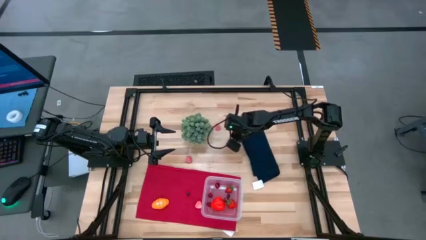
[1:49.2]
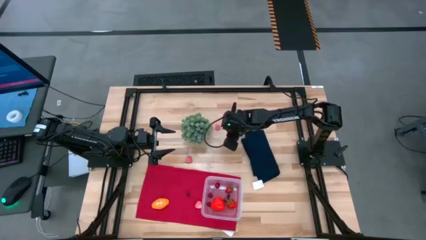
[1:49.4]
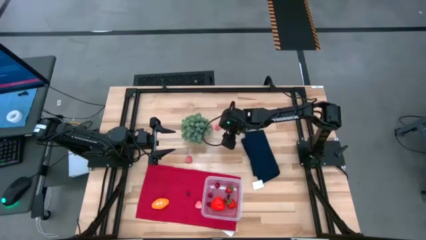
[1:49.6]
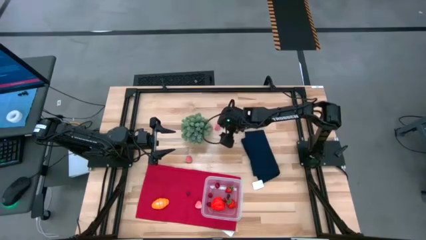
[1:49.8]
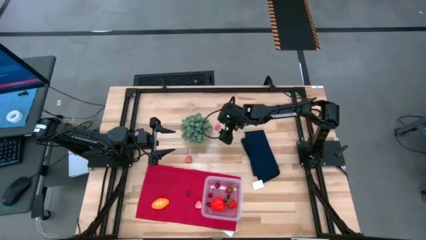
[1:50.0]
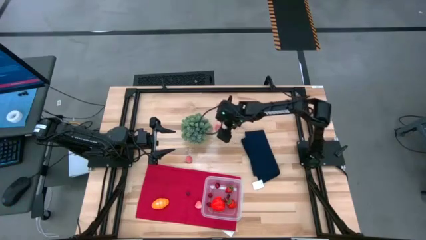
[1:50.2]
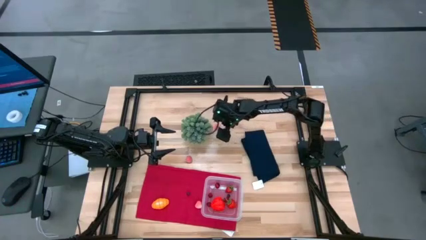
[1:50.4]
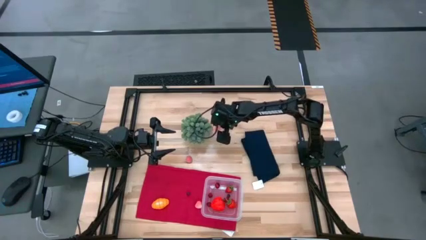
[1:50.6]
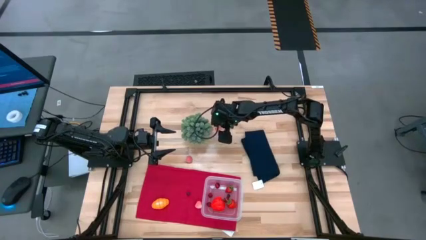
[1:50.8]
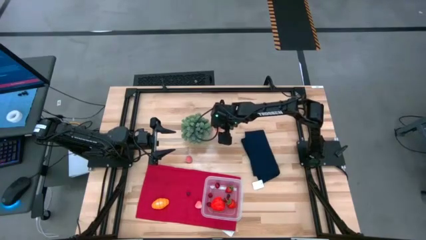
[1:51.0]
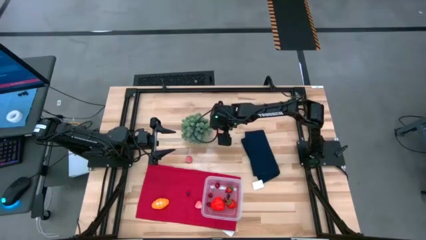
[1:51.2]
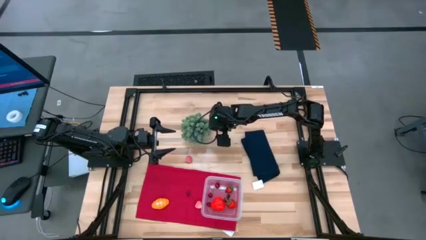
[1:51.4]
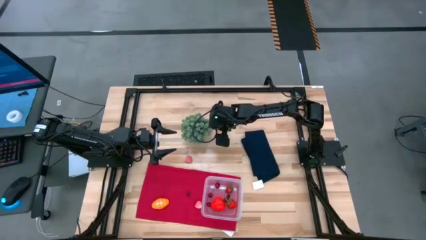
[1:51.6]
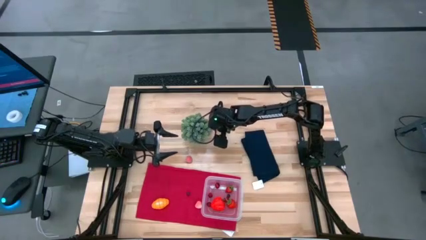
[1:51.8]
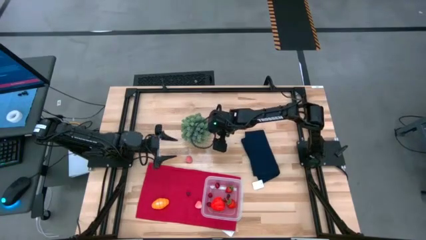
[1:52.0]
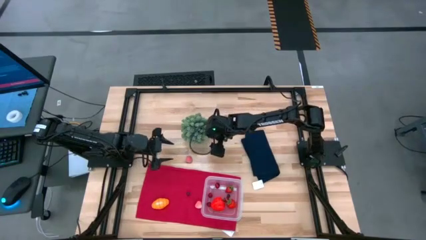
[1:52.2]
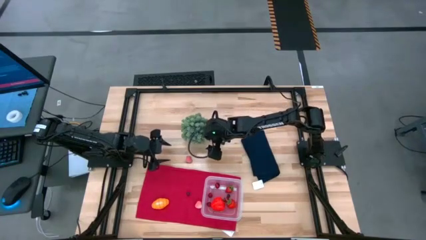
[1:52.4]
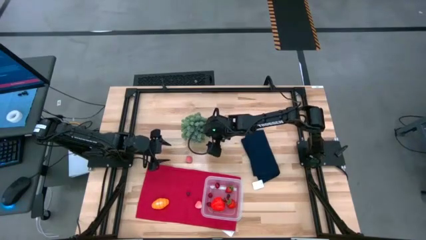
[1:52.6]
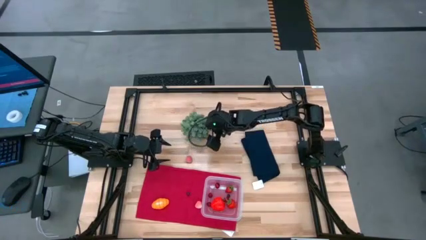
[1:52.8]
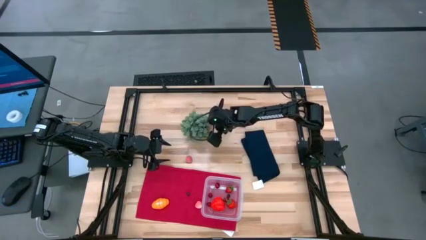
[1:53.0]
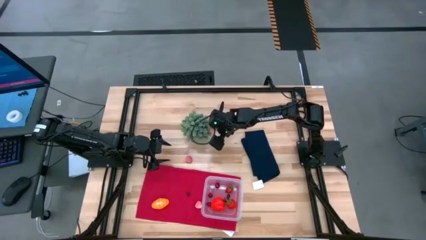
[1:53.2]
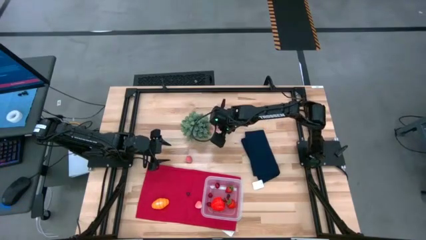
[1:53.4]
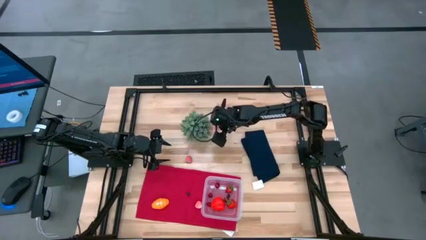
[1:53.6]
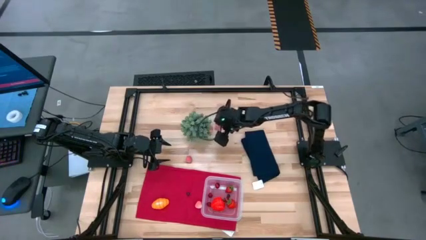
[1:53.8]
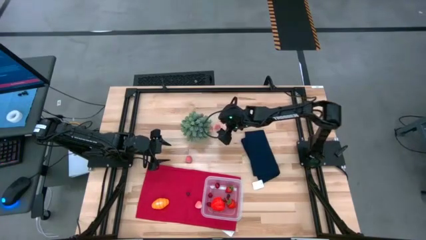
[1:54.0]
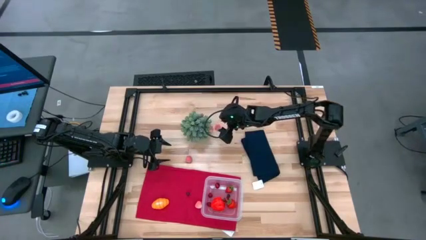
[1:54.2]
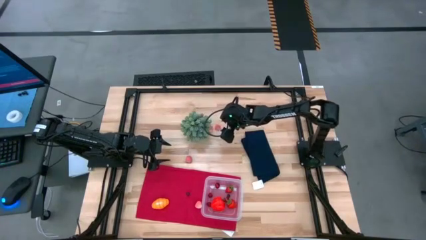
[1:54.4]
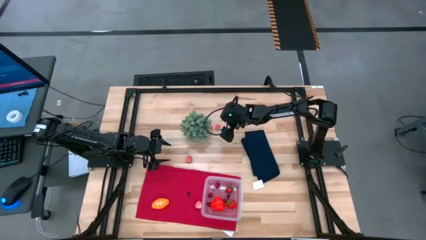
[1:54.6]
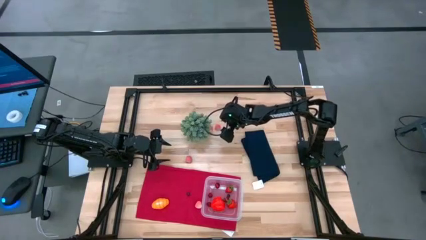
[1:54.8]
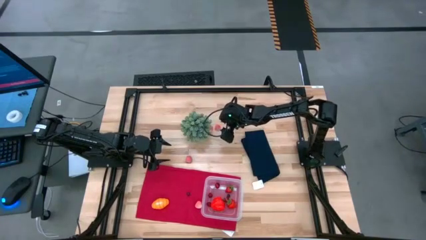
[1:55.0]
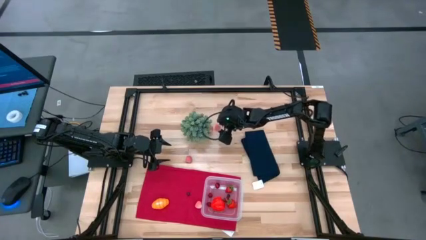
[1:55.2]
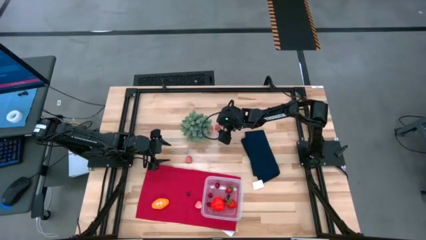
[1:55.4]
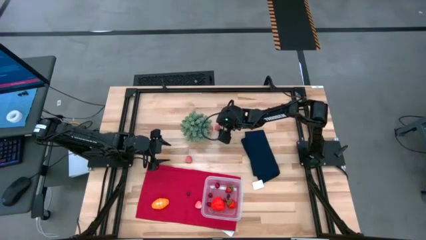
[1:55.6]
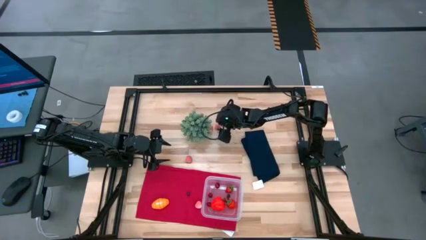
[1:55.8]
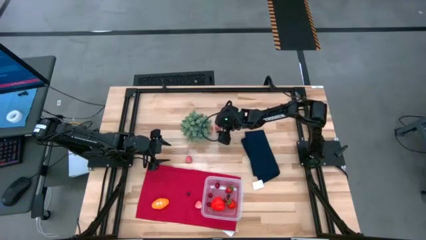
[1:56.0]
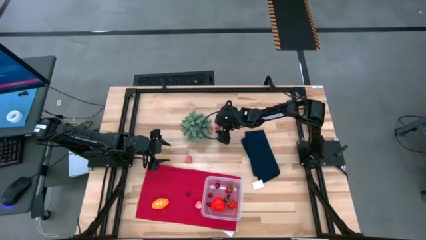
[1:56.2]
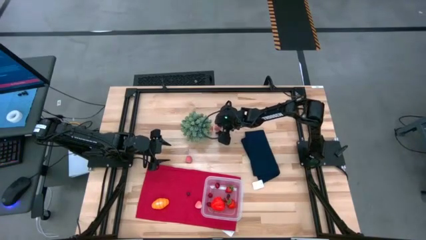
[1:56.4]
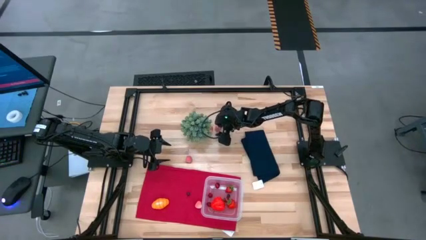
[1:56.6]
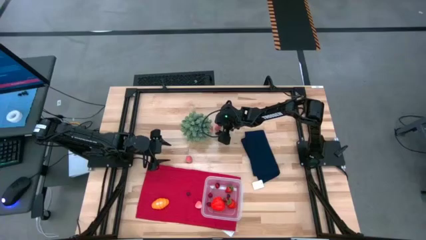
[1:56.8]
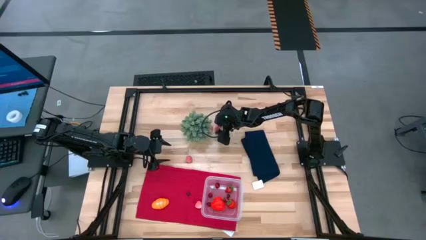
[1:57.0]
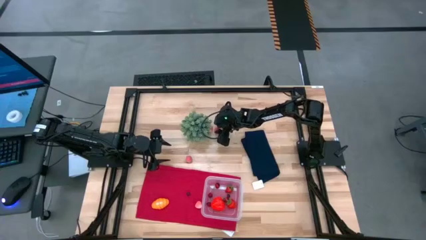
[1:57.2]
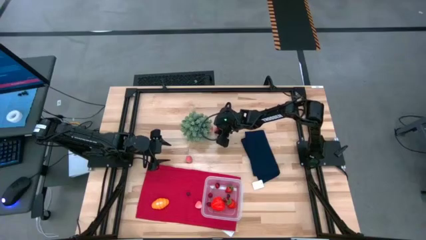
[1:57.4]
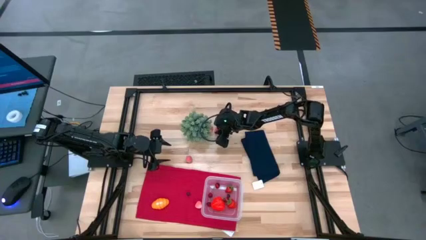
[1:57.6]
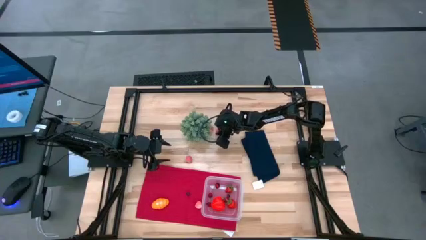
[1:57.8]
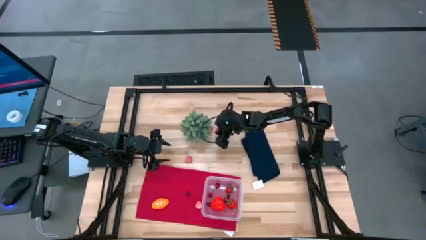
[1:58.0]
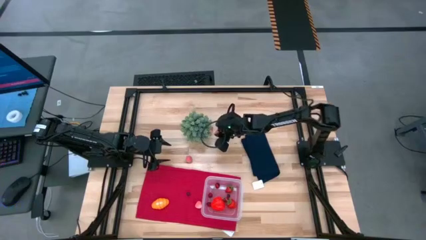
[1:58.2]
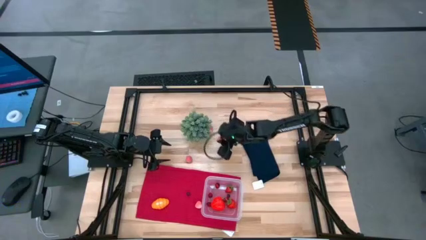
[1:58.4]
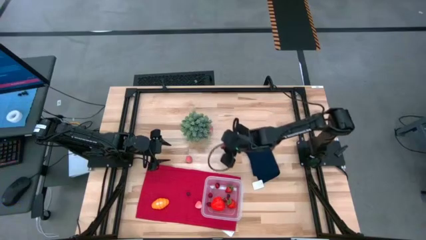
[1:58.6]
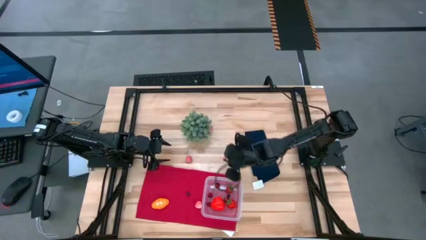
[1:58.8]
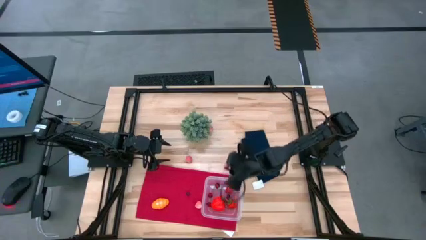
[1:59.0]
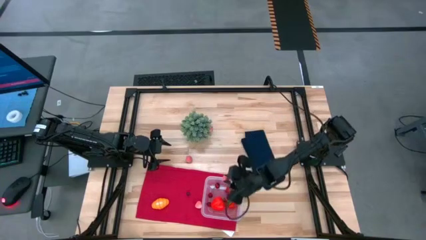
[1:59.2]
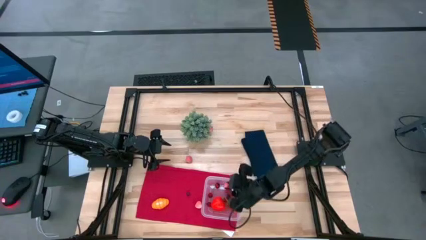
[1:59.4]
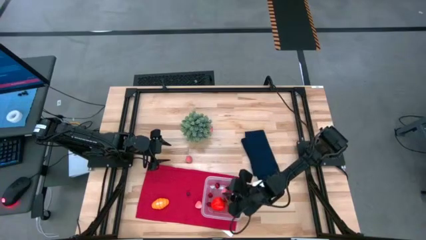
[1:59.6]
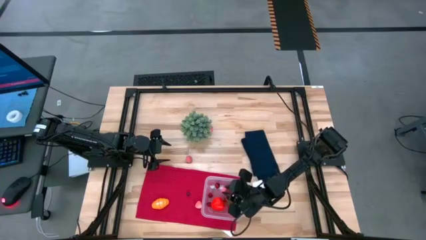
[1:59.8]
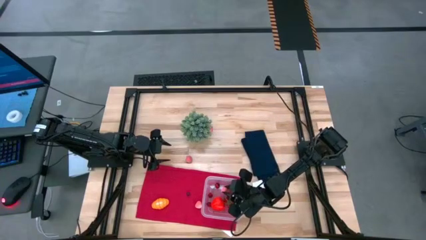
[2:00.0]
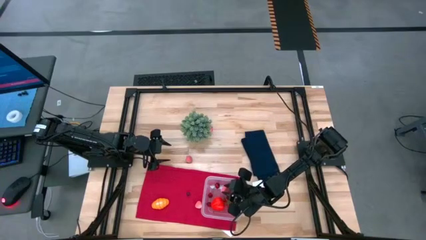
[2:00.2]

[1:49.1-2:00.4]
Task: Pick and placing Produce into tupperware
Put the apricot into the transparent bin

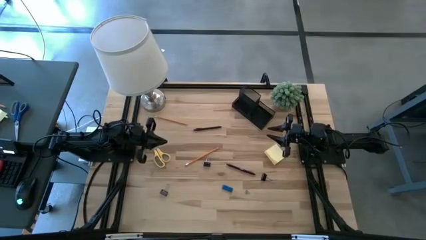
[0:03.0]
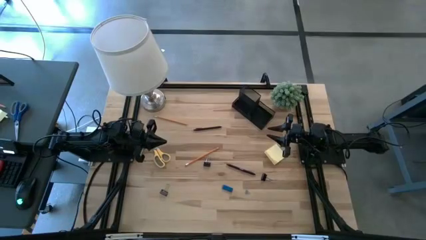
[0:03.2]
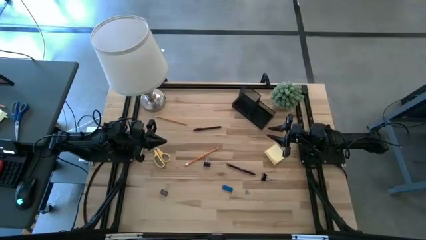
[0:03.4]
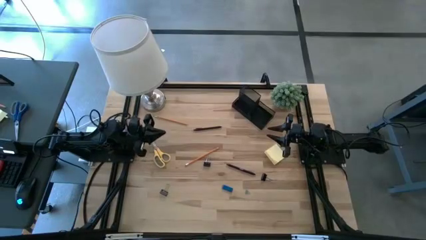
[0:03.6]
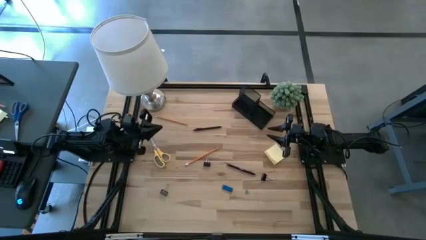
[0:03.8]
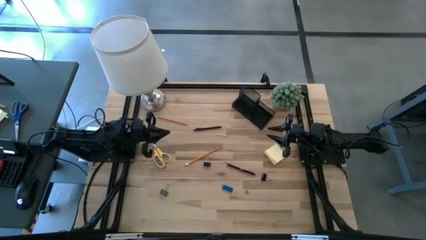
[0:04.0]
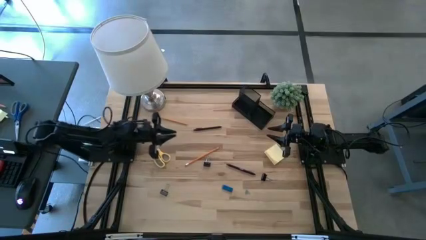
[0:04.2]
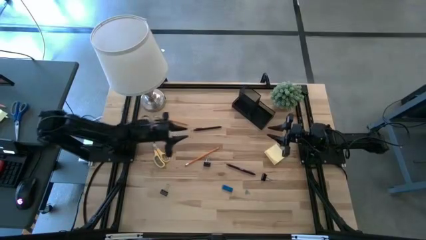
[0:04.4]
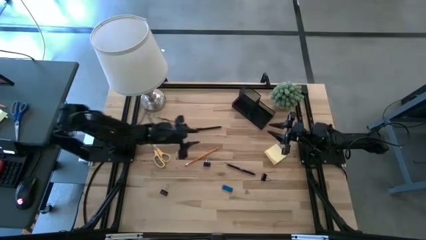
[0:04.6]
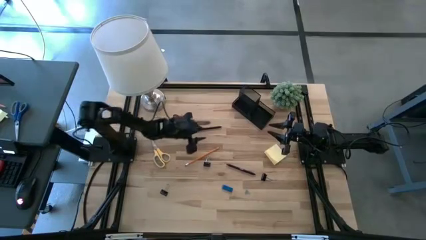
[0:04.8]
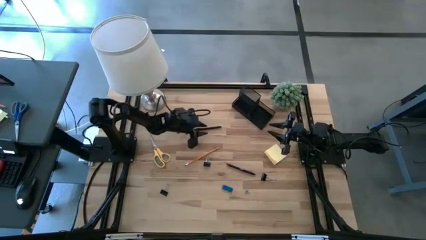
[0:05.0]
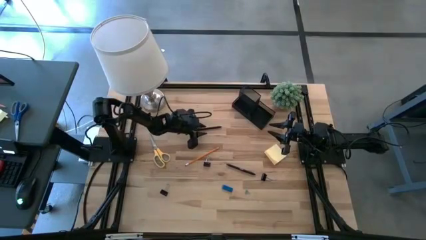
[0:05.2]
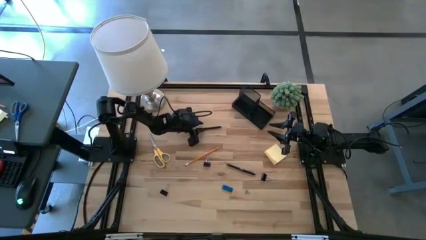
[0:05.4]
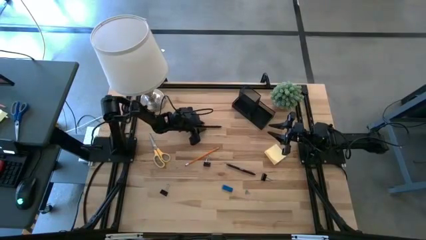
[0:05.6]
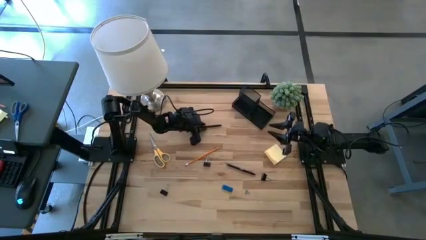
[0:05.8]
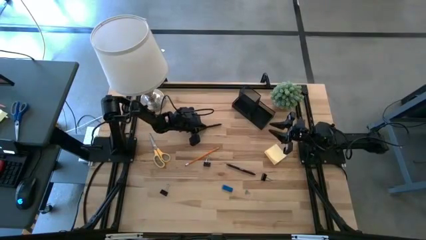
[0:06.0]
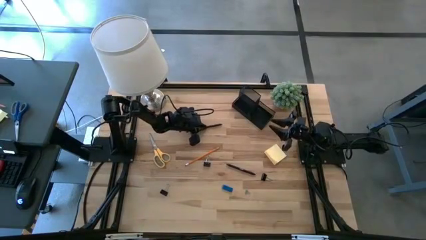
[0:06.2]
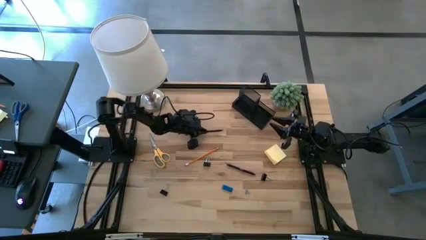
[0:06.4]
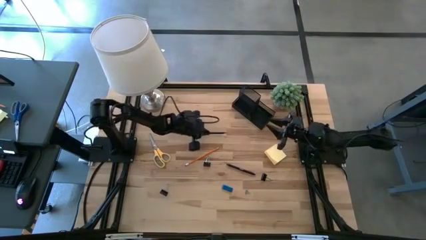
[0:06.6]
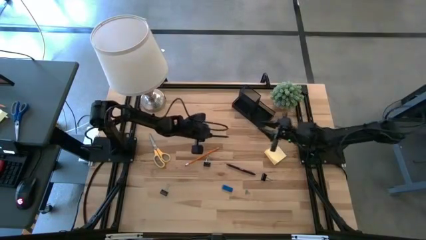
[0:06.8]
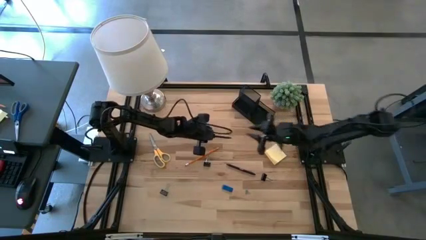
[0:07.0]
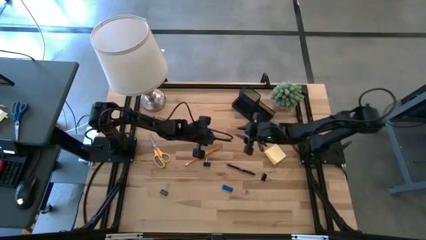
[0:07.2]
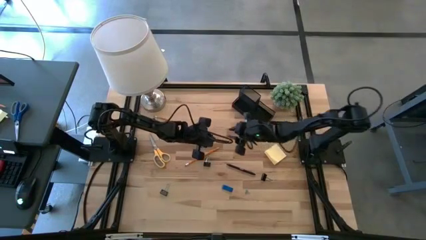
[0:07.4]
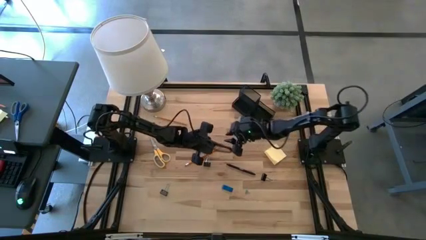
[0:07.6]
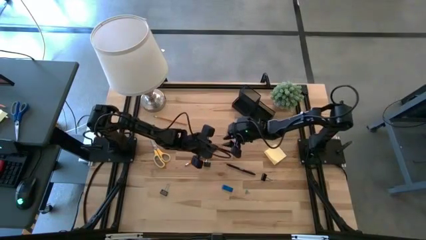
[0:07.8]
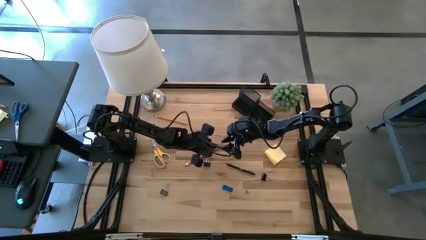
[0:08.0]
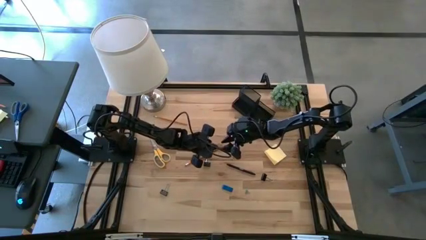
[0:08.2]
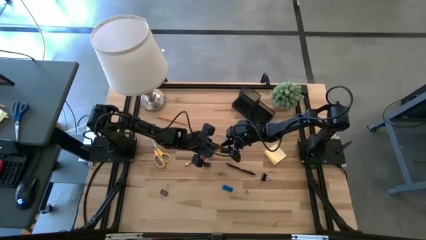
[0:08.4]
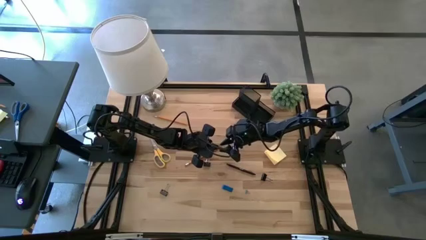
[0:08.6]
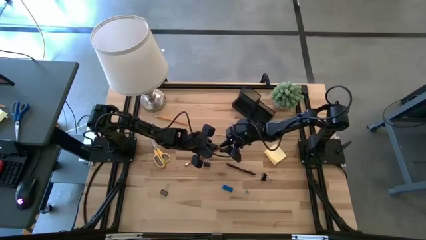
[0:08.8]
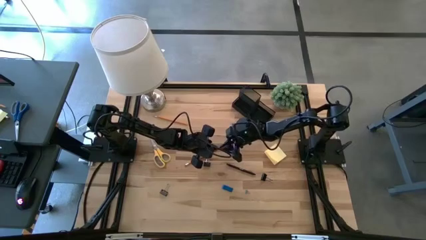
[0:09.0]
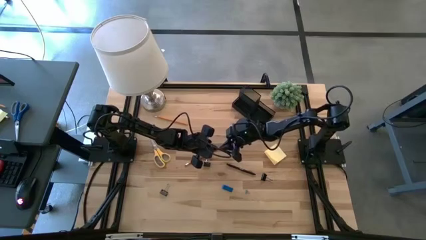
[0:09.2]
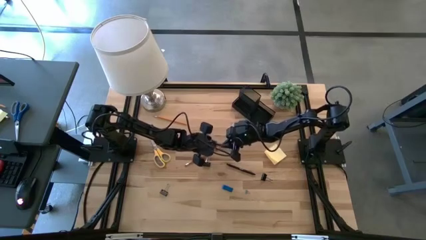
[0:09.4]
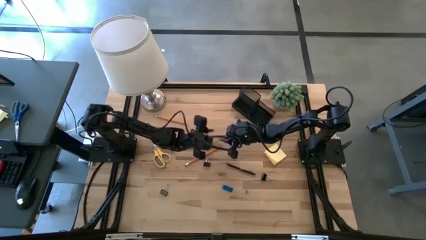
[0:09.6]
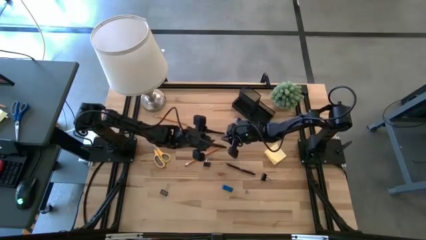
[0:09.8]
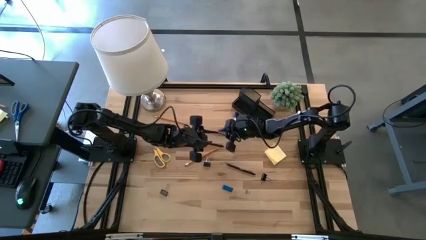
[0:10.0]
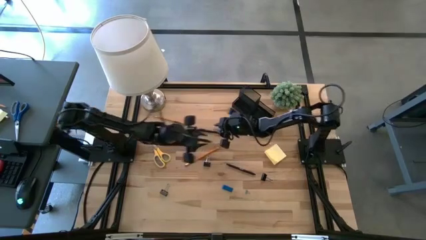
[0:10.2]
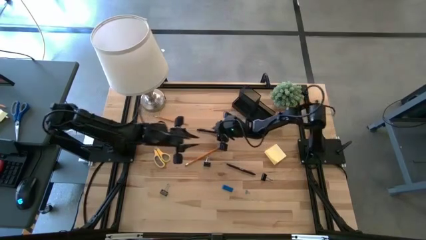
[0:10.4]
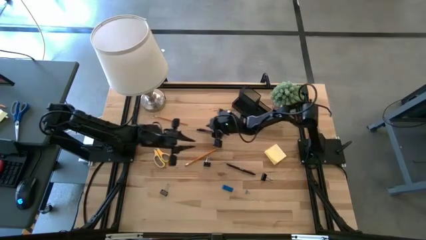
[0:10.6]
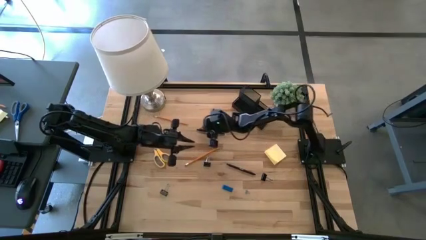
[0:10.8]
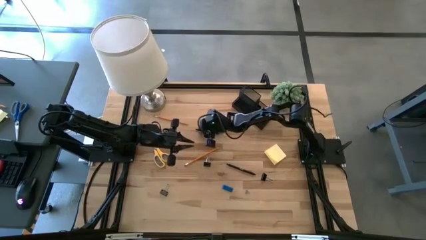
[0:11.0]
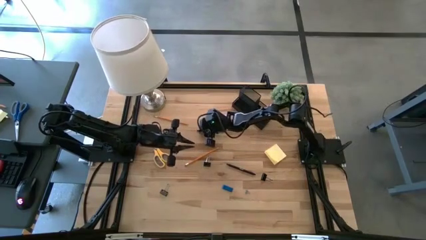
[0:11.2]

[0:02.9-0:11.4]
Task: Pick and place office supplies into organizer
Put the top black pen into the desk organizer
